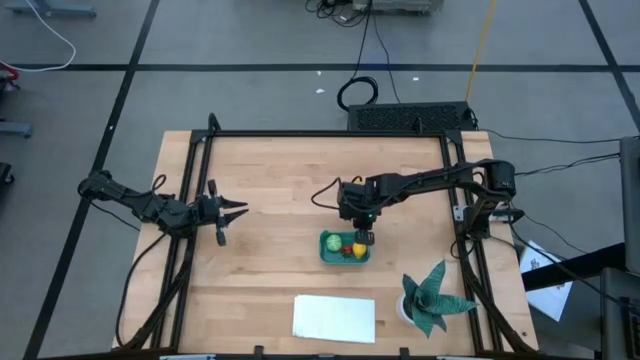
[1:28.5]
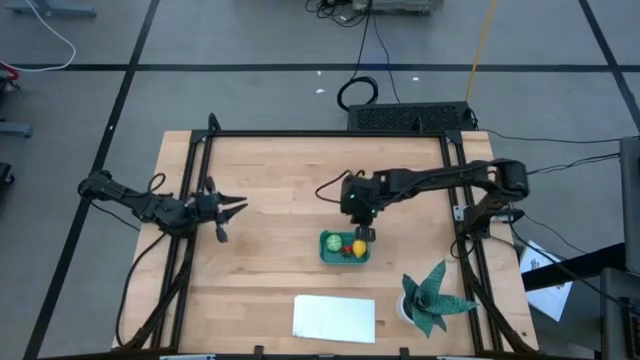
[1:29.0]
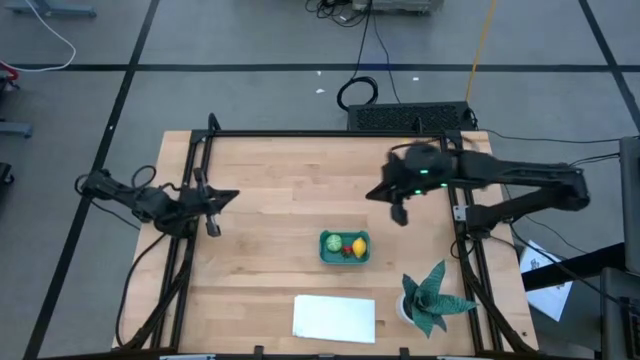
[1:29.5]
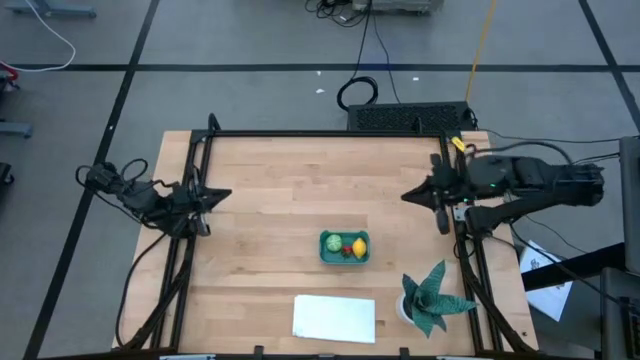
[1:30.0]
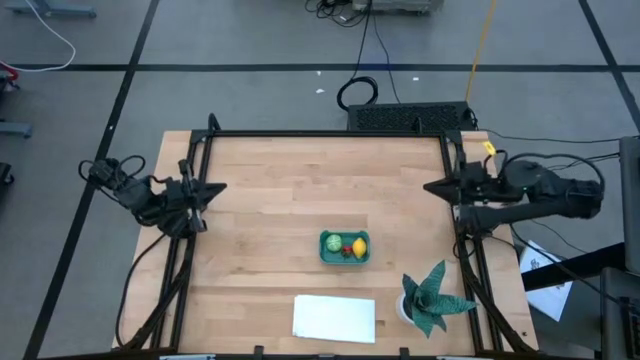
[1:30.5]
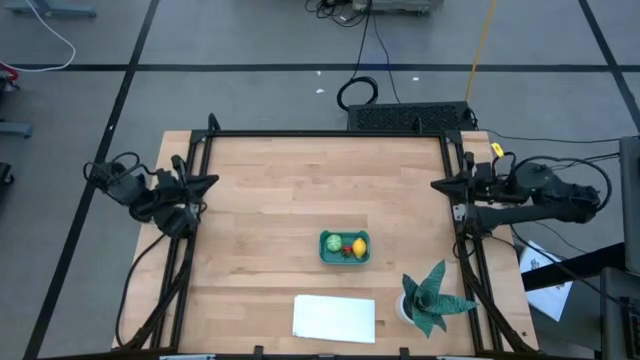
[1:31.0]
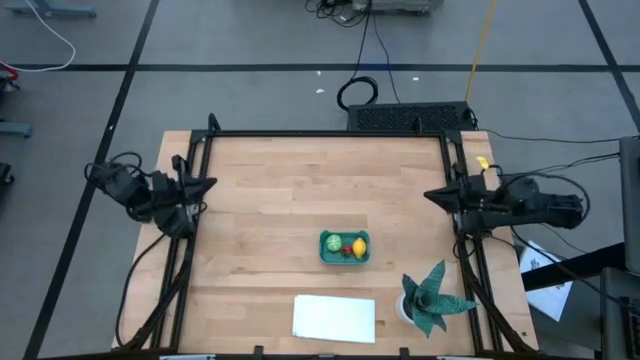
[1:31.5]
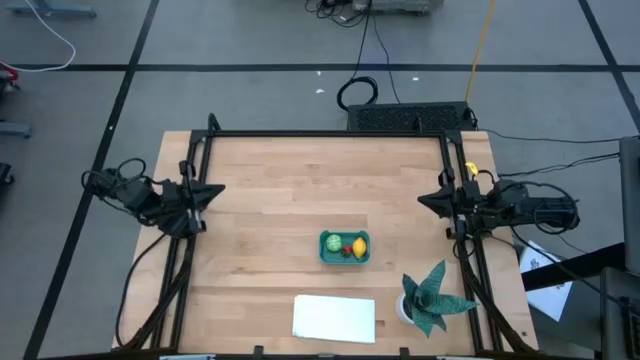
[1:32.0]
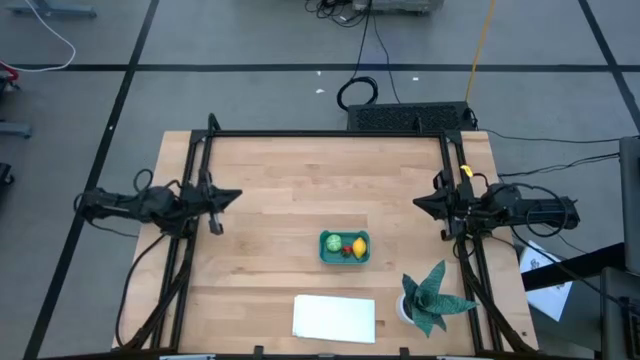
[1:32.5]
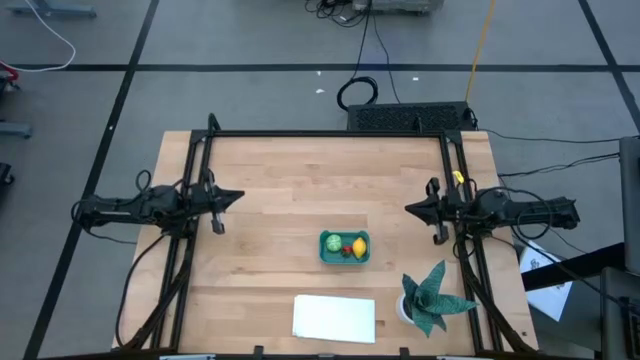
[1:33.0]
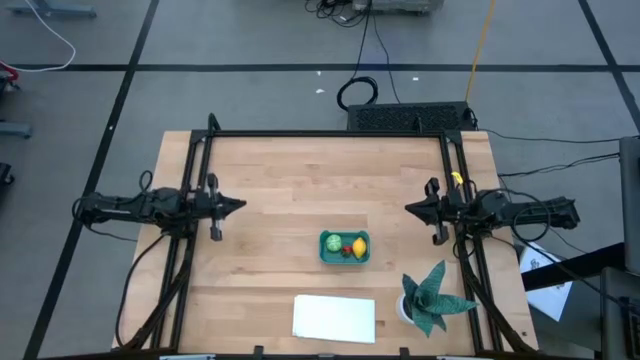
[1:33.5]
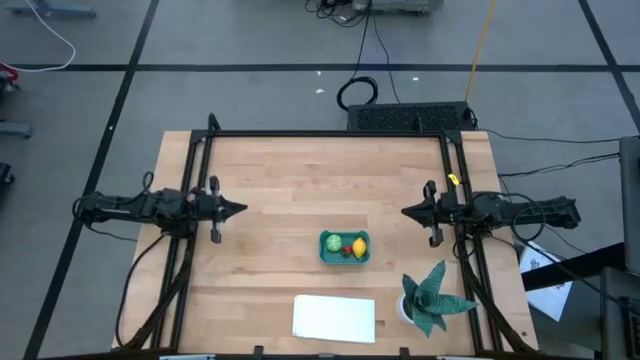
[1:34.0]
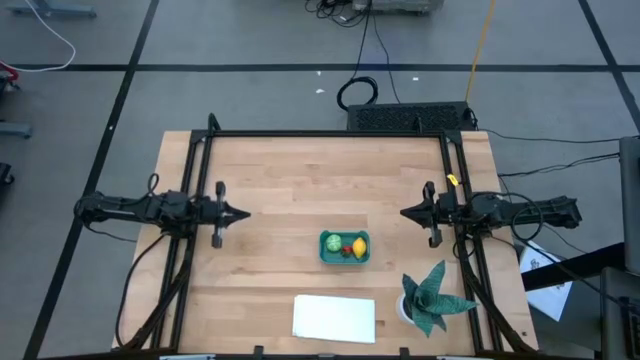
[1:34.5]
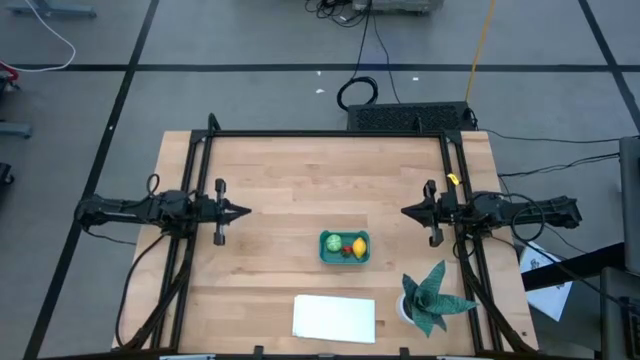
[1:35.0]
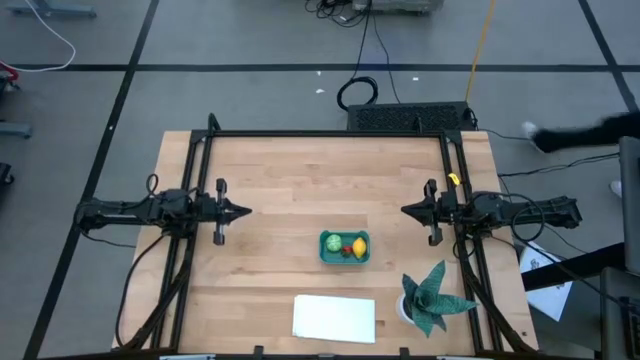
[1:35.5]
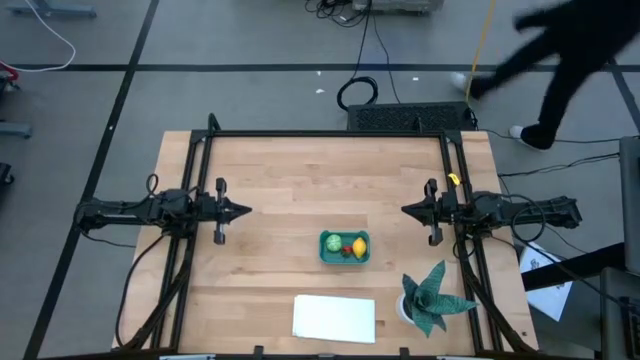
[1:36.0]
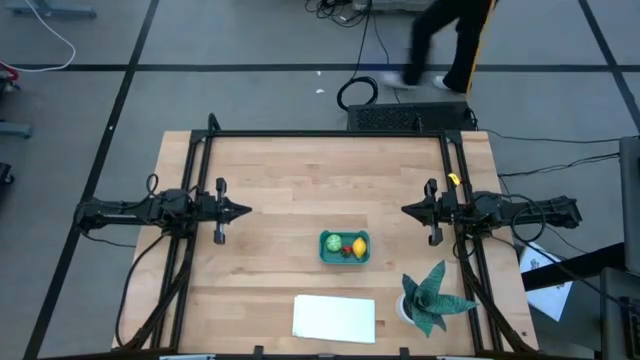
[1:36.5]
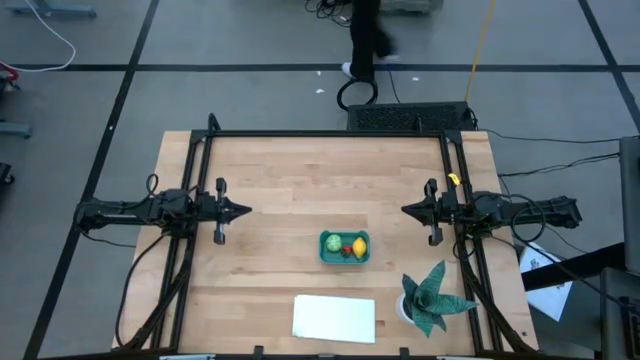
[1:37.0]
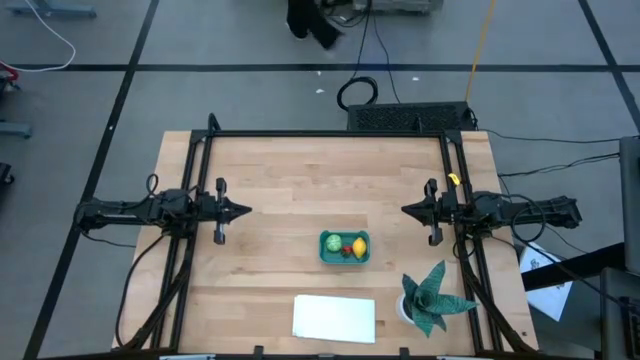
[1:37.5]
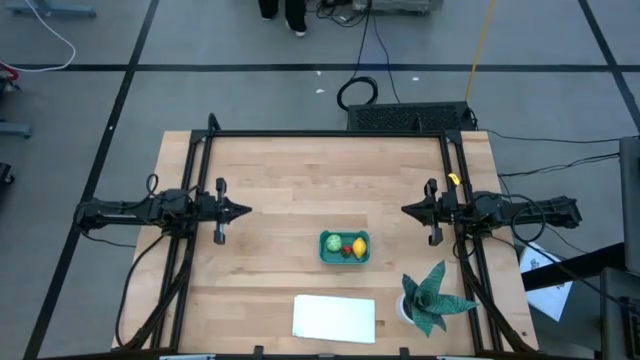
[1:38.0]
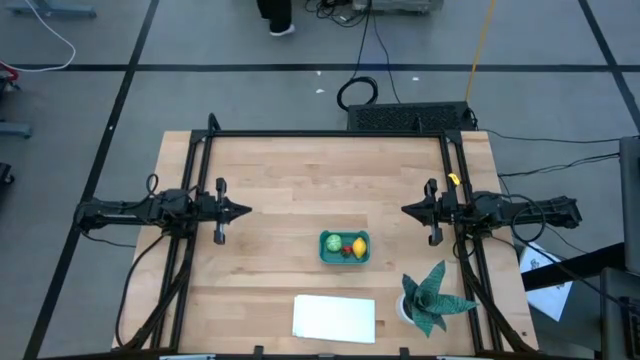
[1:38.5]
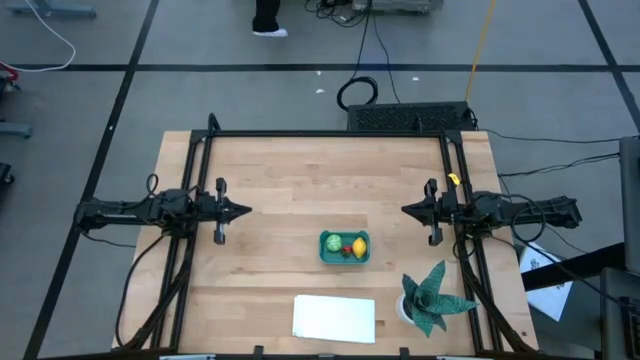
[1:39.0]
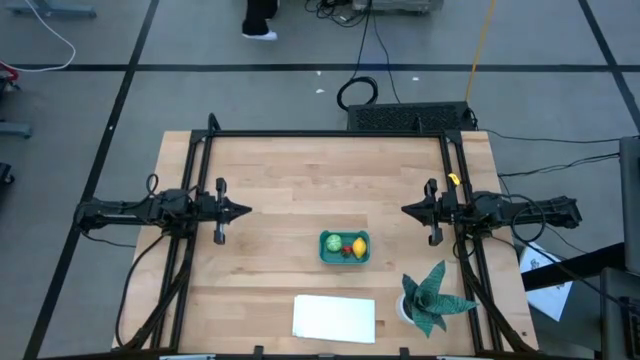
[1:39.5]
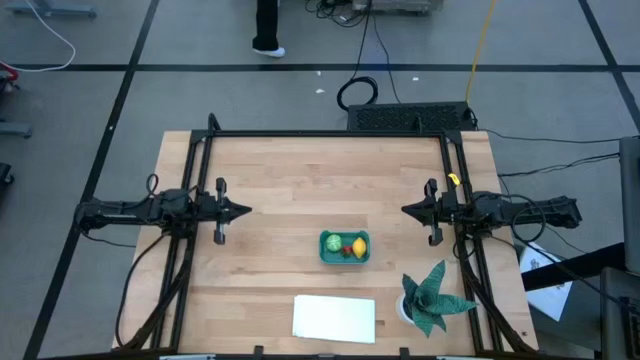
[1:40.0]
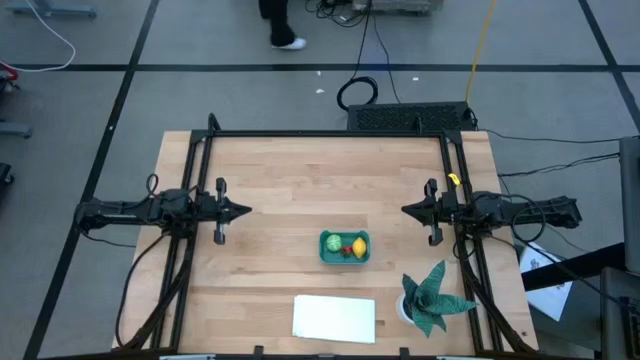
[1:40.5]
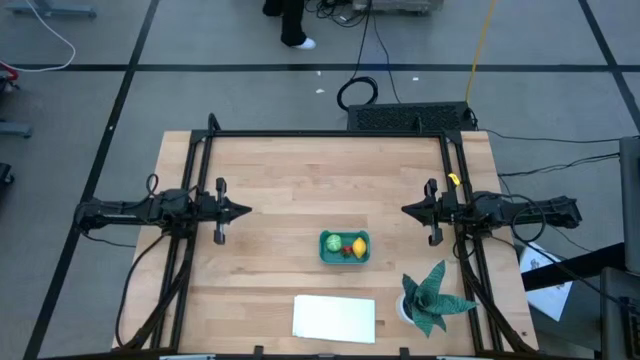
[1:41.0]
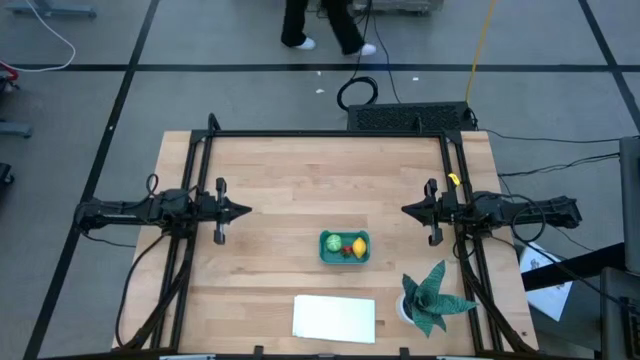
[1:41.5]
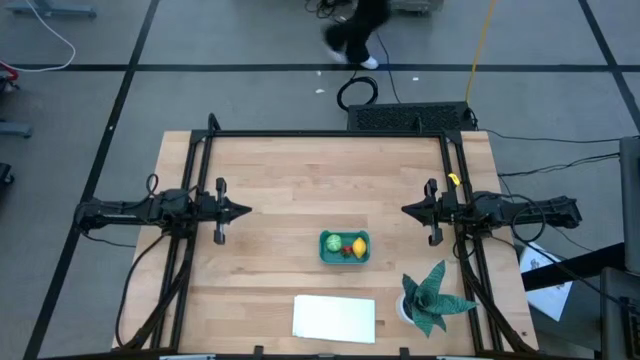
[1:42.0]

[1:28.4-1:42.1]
Task: Pick and placing Produce into tupperware
Return to Home Position

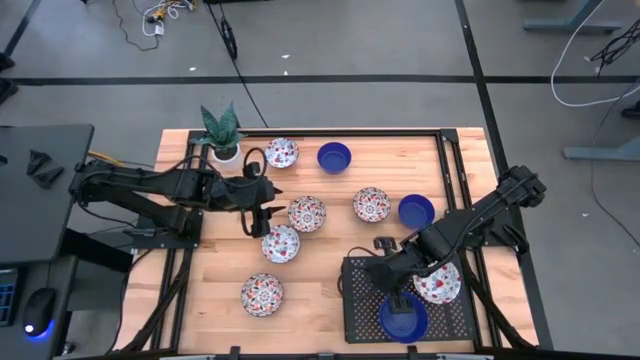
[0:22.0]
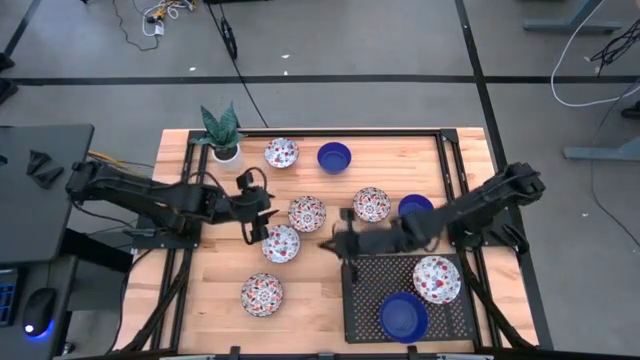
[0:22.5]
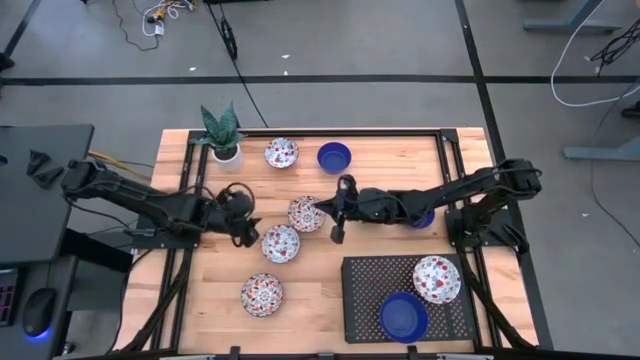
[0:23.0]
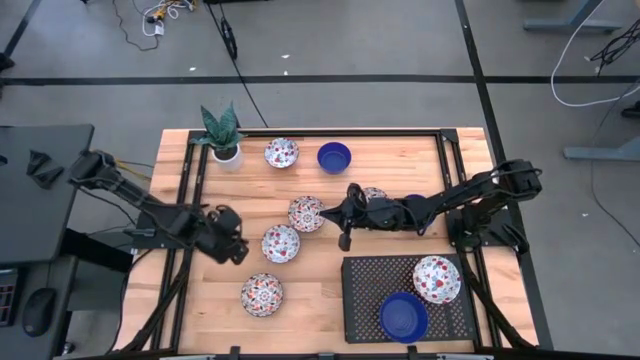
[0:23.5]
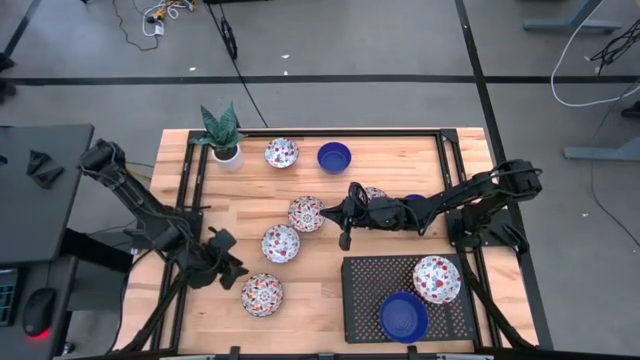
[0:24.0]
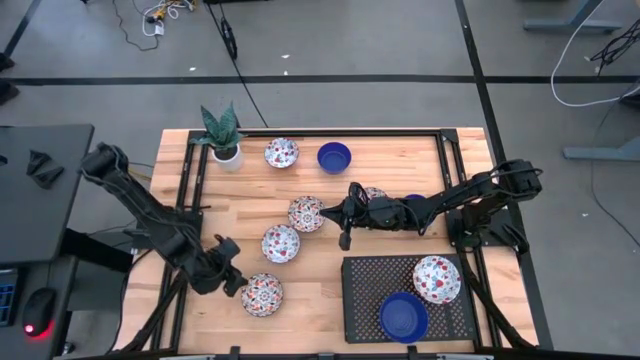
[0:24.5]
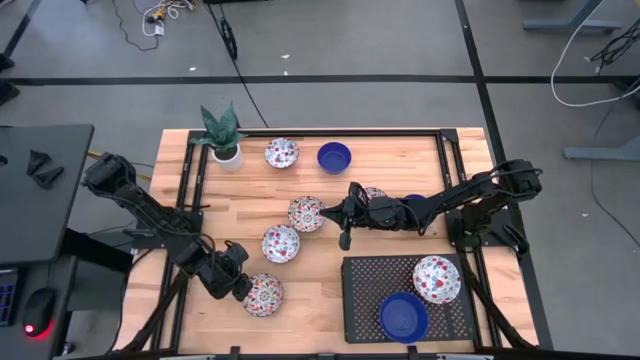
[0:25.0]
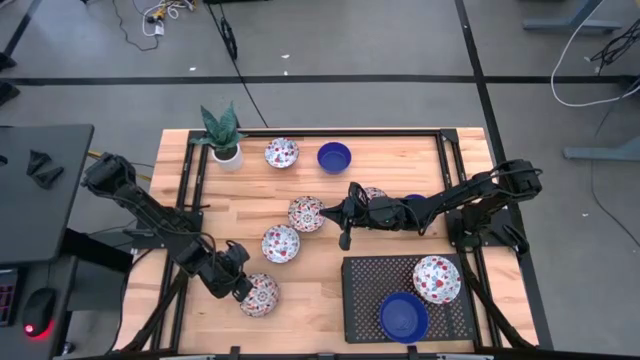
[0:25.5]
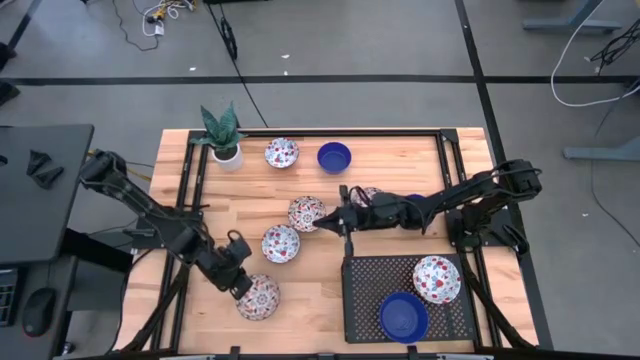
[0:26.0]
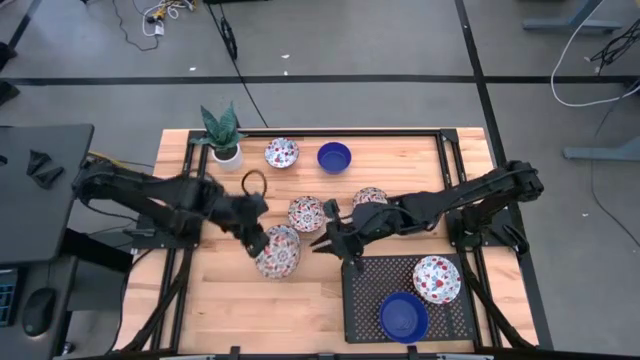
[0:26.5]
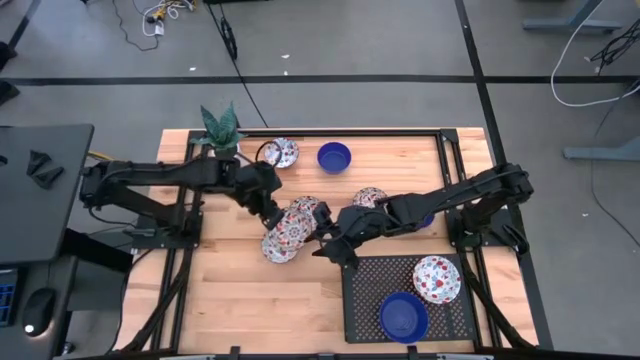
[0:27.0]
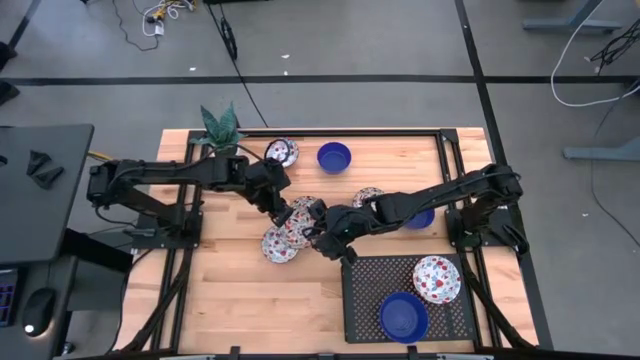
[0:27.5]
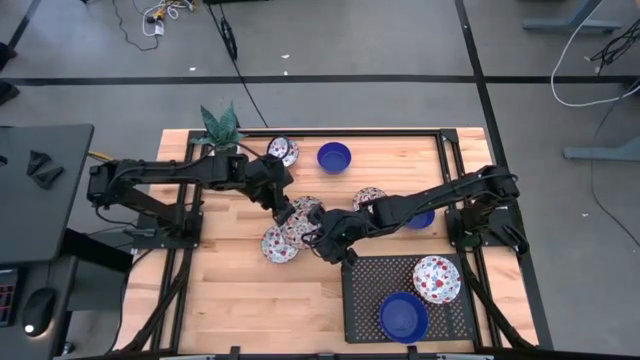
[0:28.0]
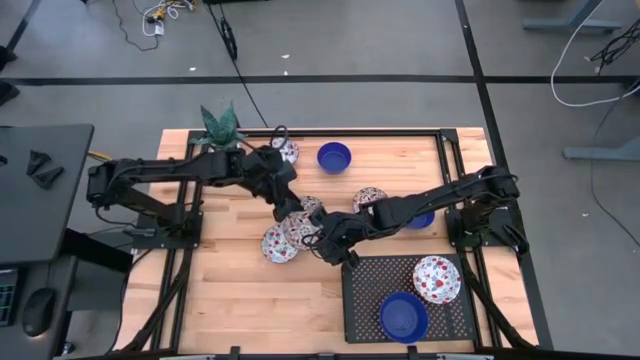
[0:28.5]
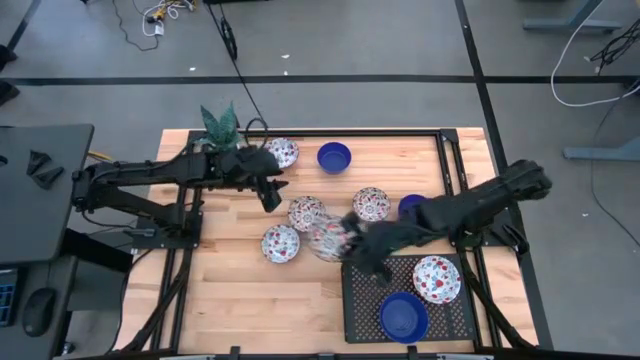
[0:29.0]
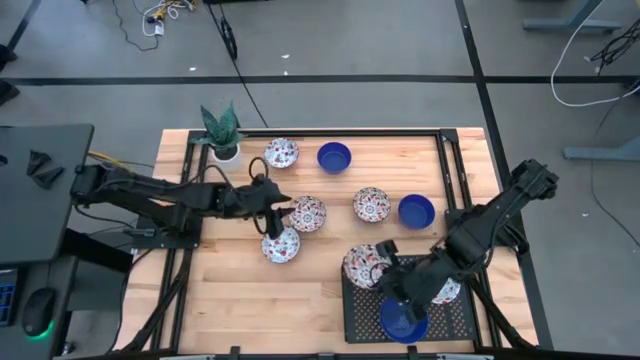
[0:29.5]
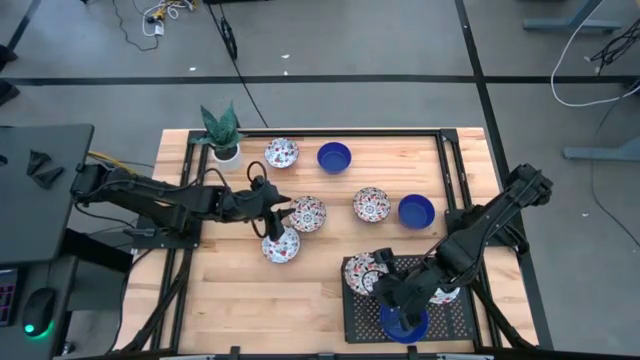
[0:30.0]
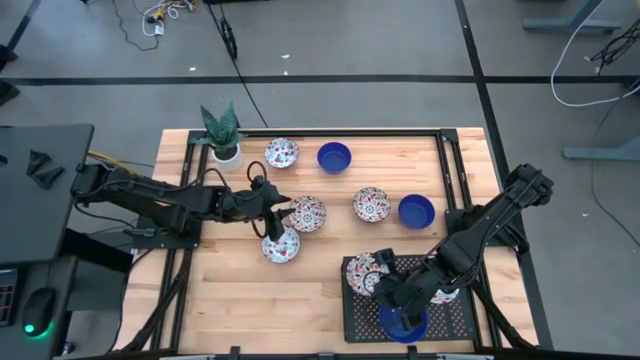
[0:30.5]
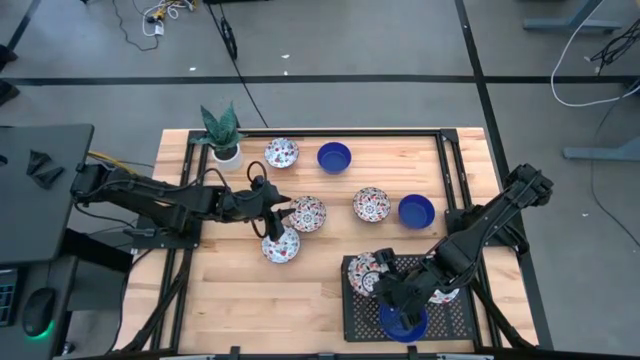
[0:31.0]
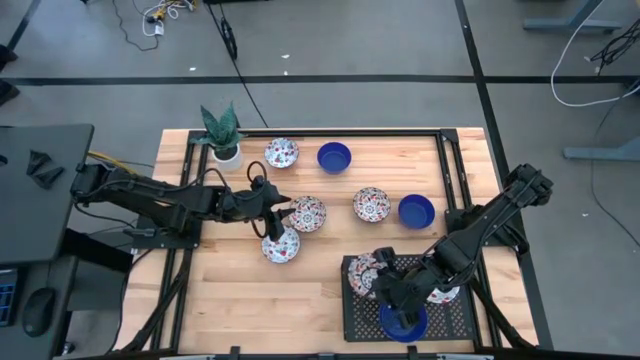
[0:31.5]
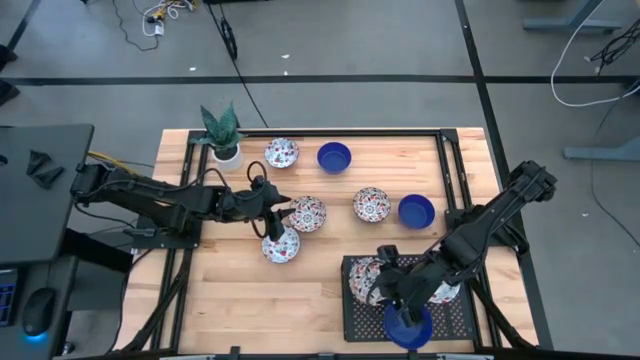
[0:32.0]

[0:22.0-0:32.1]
Task: Pick & Place Mini bowls
Put the bottom left orange patterned bowl on the shelf
